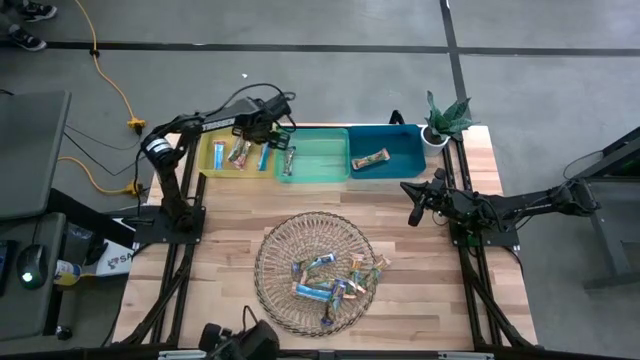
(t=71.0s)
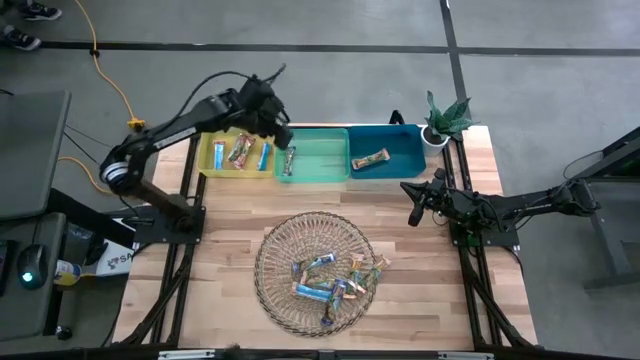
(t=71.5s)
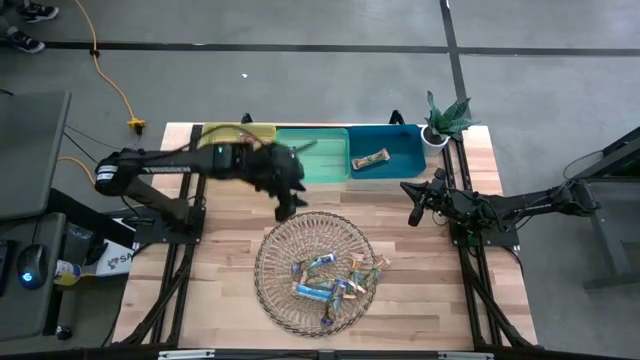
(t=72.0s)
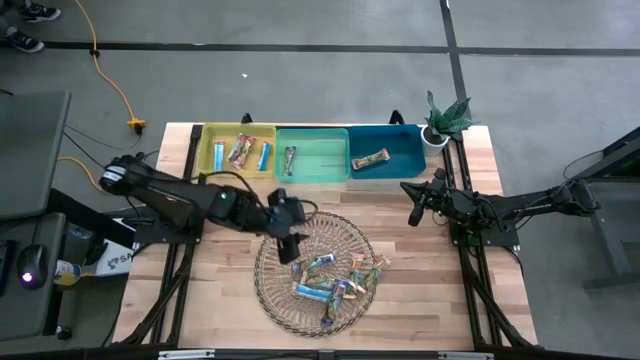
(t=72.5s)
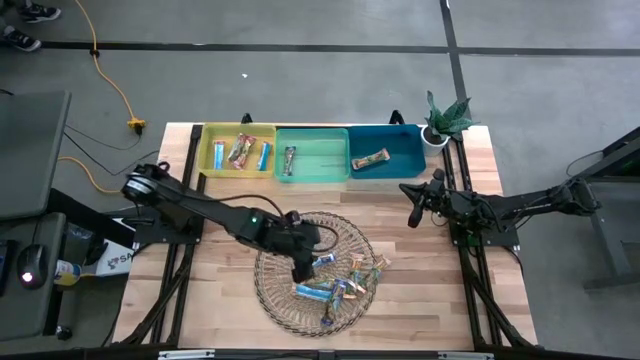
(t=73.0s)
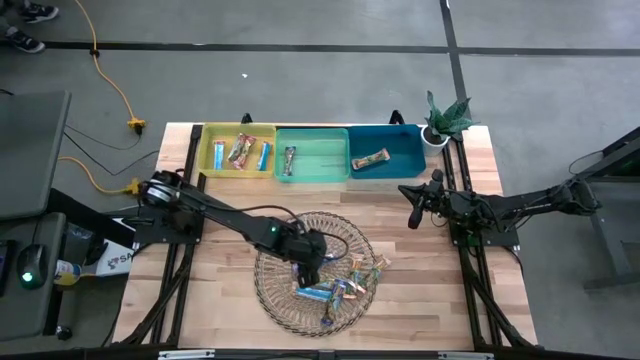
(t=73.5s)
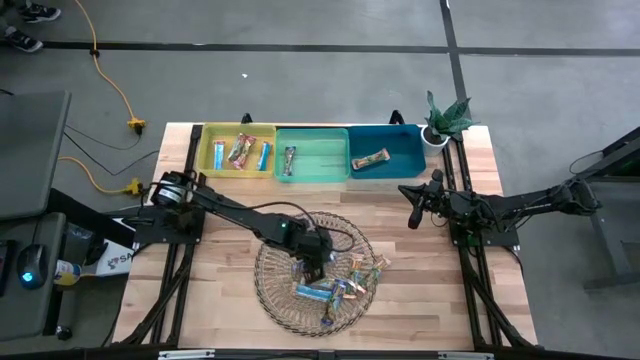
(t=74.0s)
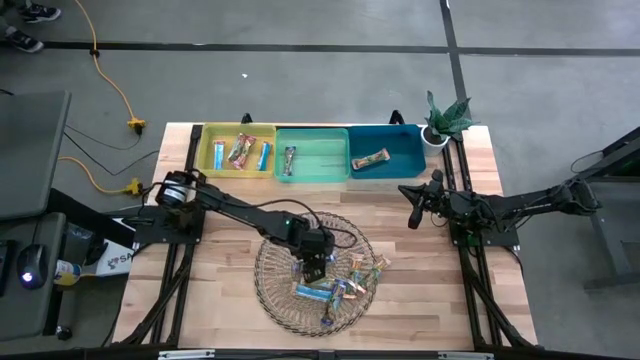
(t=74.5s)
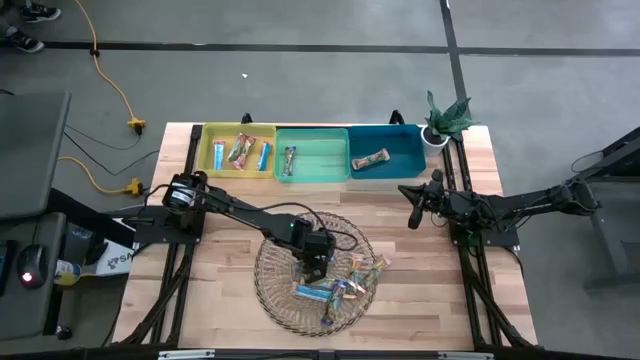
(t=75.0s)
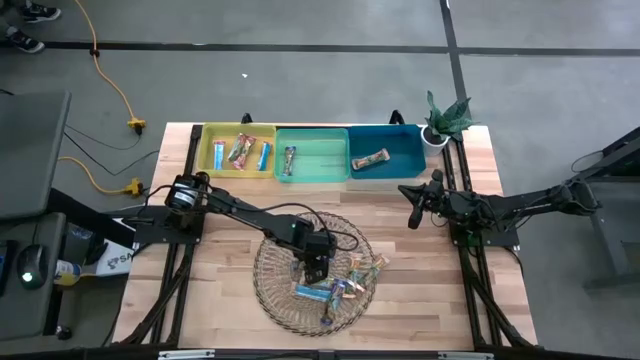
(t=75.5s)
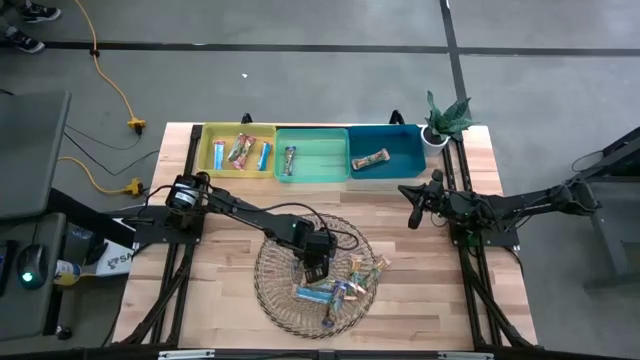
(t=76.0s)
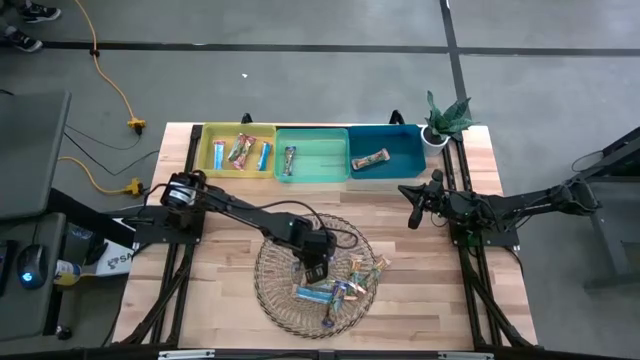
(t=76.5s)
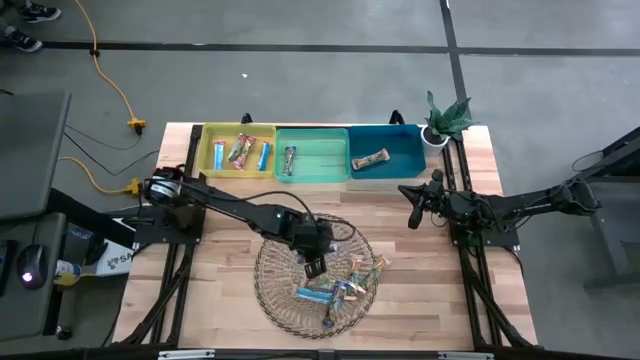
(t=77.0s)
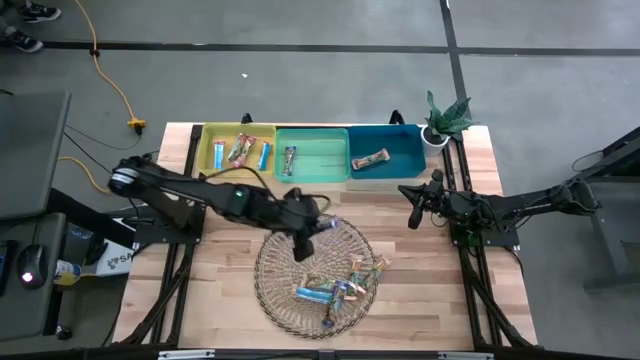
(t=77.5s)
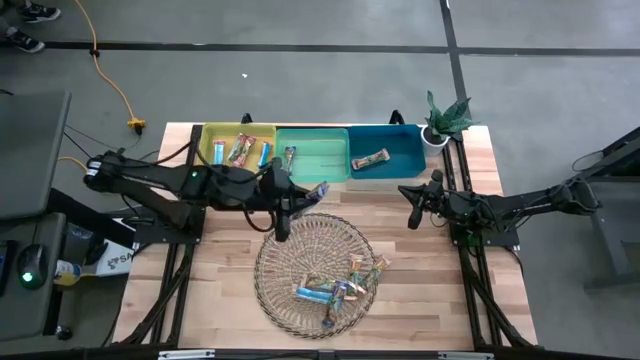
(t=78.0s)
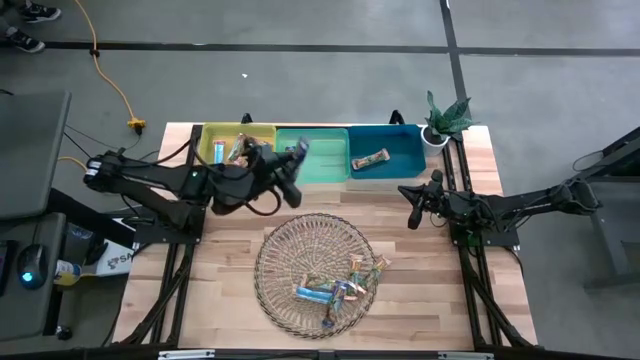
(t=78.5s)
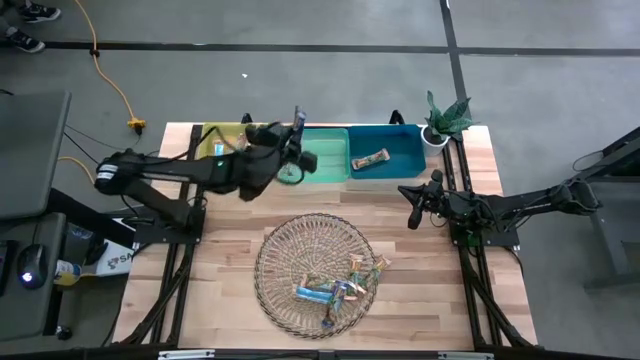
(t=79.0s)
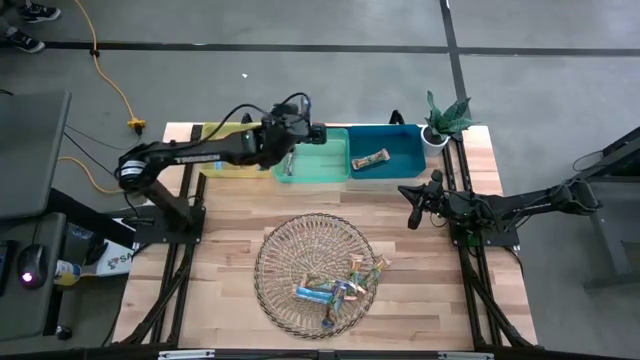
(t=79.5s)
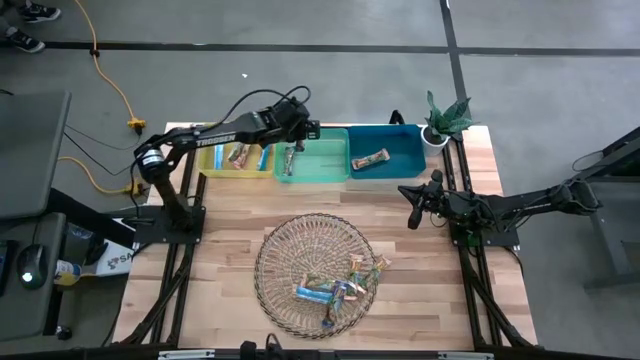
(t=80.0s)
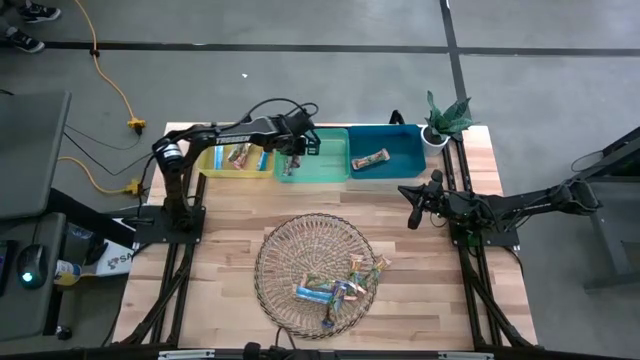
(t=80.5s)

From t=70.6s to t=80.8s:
Task: Pick and place Granola Bars by type
Put the blue granola bar into the green bin

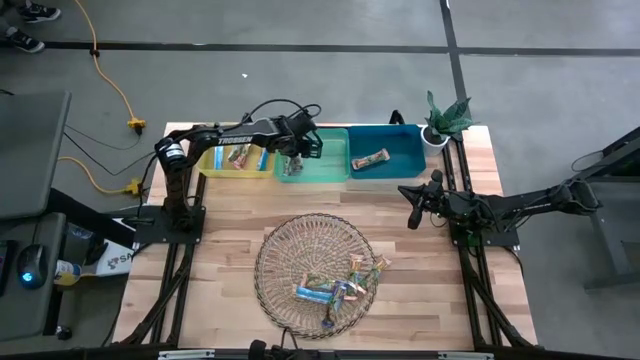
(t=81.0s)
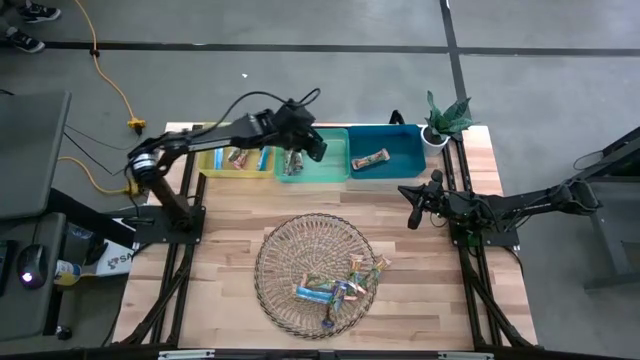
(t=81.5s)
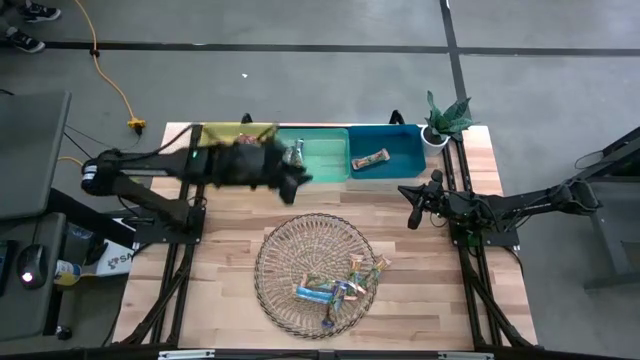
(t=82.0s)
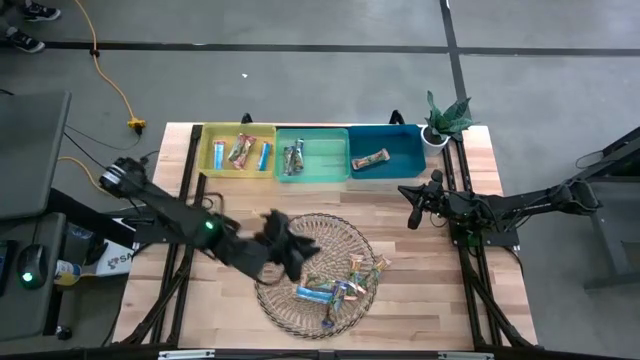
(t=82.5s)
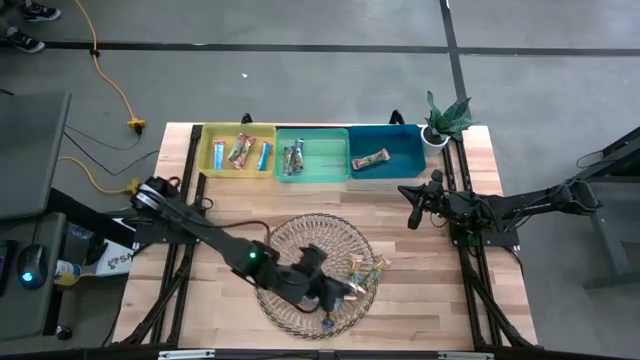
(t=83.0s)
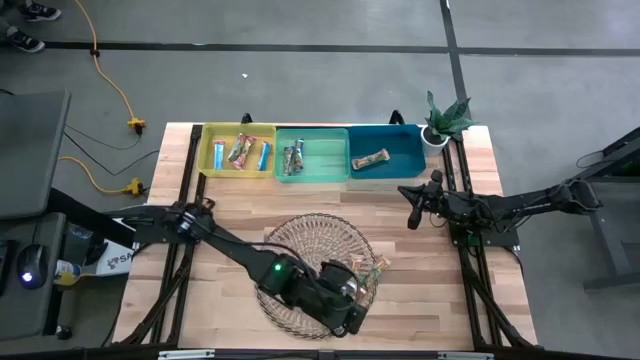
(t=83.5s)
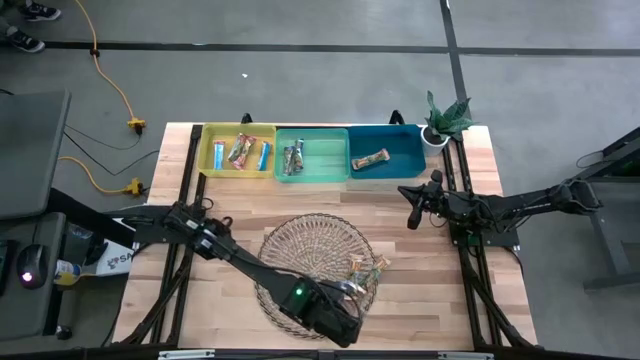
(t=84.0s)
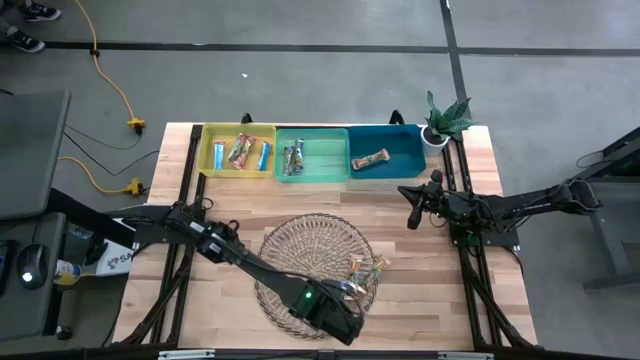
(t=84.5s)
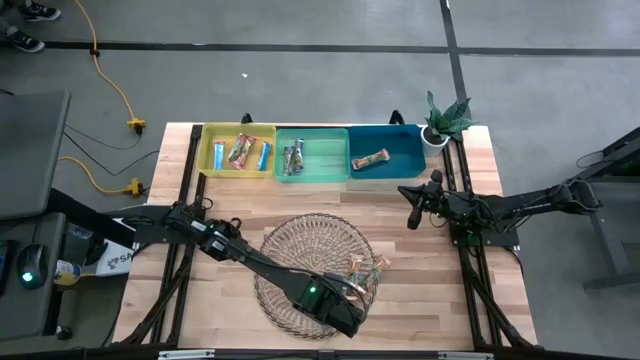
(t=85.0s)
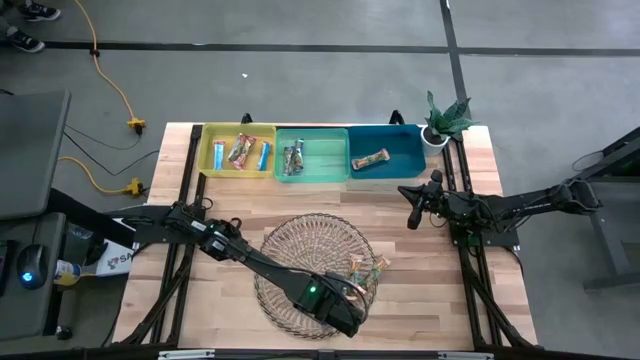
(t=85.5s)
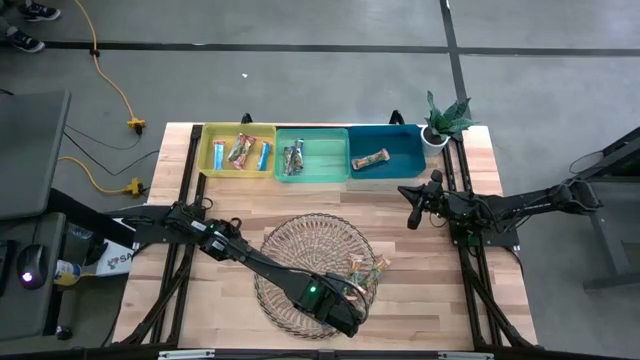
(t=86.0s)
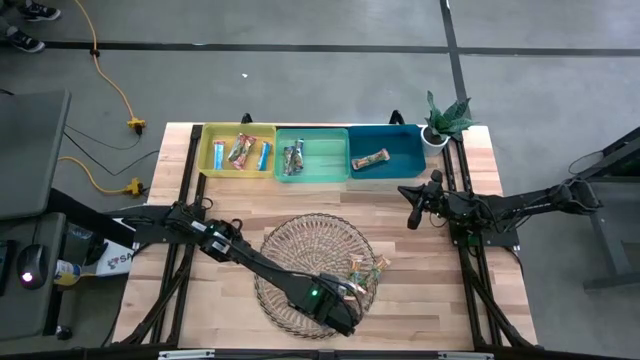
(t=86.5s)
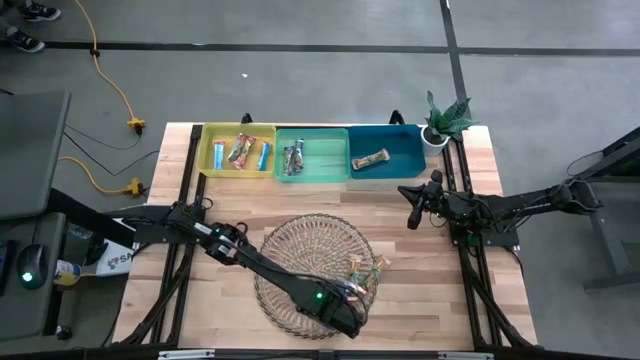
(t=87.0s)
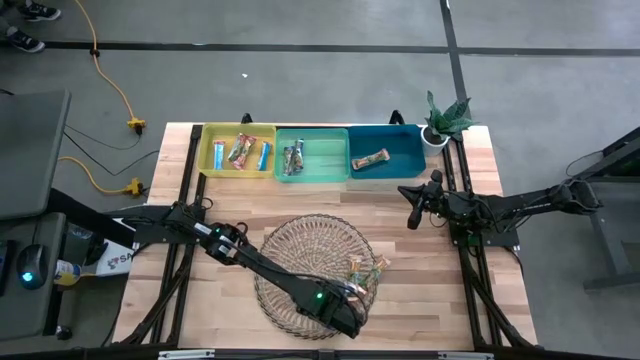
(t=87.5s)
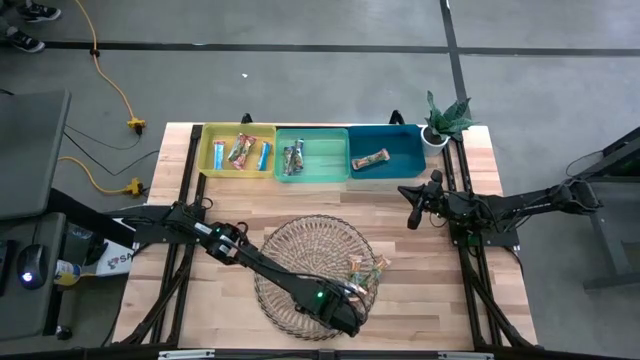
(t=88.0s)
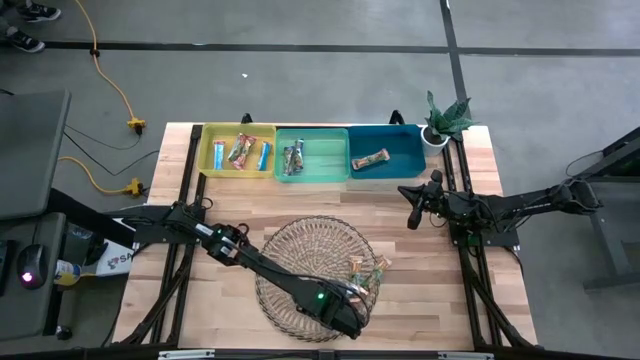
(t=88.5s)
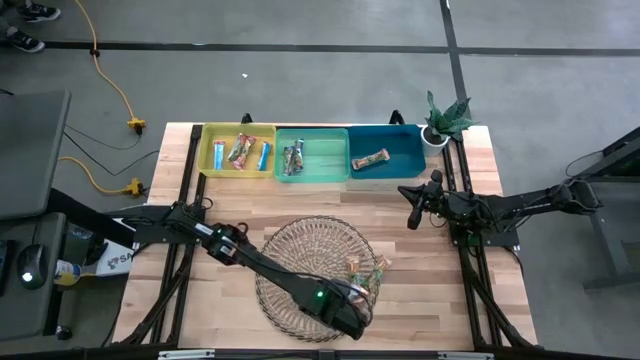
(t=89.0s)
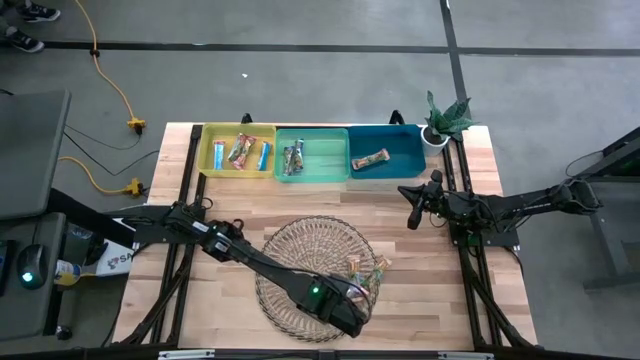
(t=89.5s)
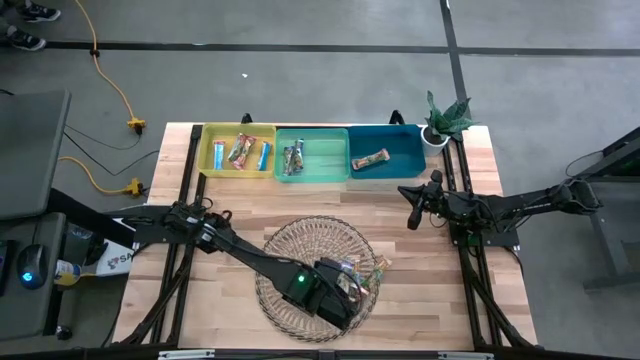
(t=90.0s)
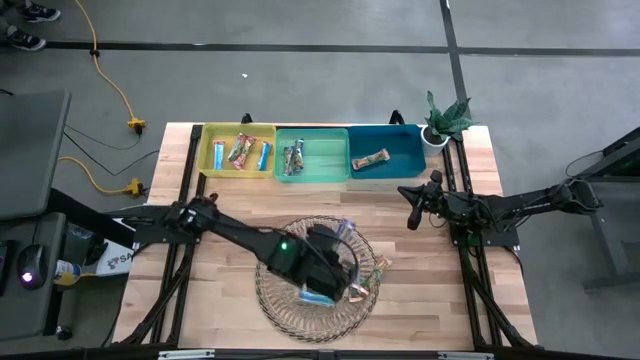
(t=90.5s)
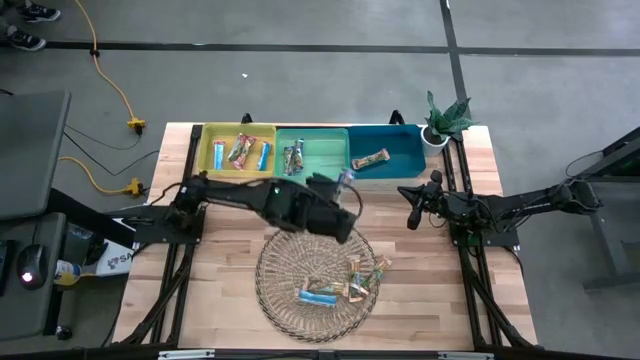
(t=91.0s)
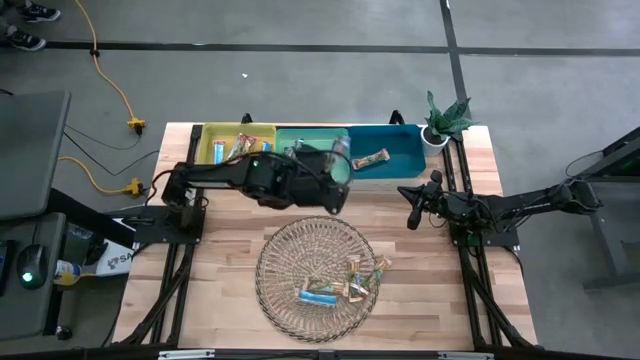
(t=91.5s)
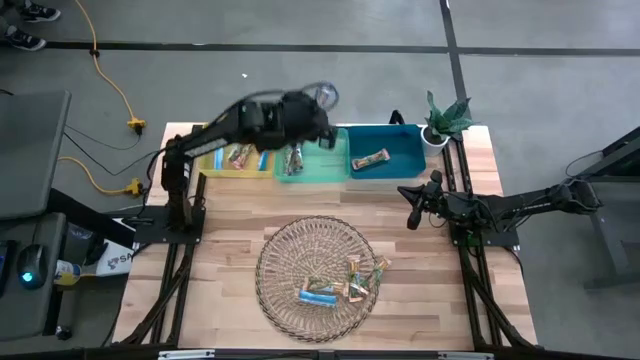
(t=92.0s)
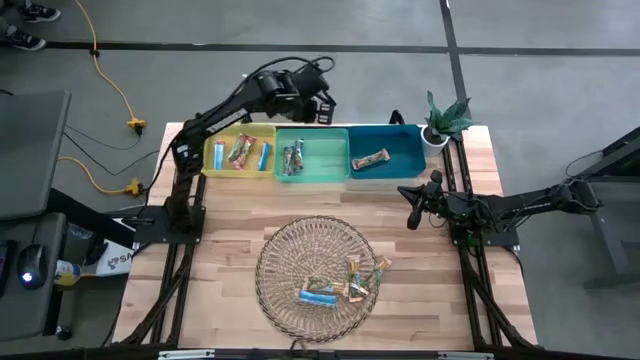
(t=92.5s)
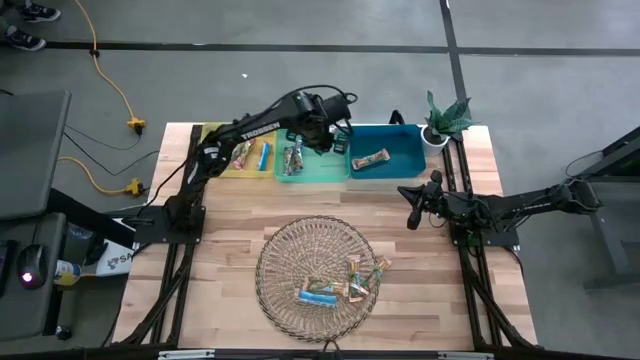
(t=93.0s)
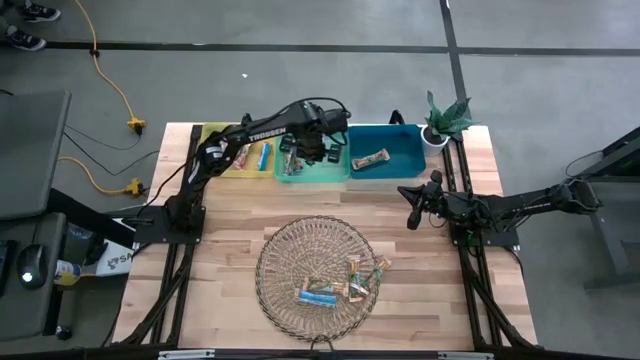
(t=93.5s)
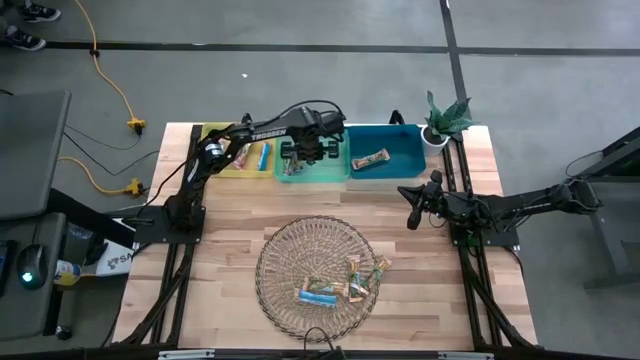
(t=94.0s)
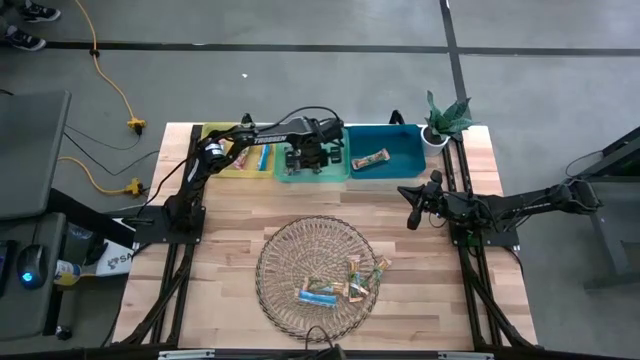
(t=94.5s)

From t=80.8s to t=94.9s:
Put the blue granola bar into the green bin
